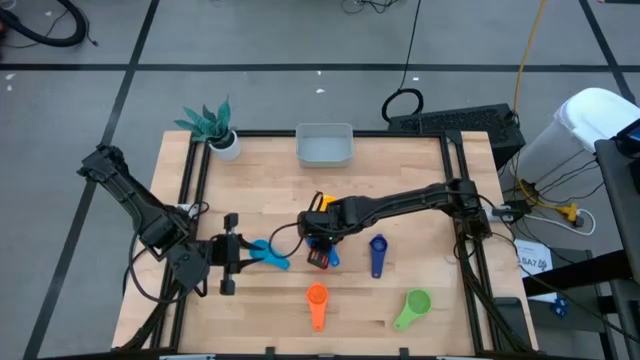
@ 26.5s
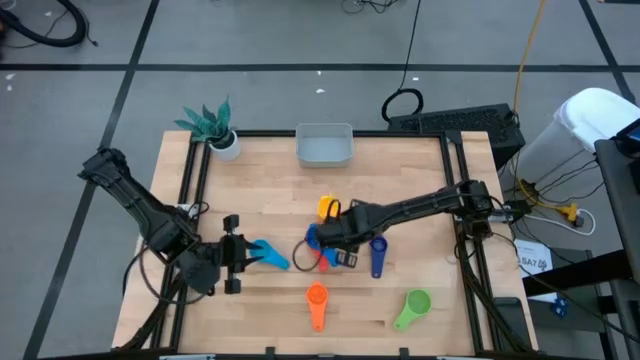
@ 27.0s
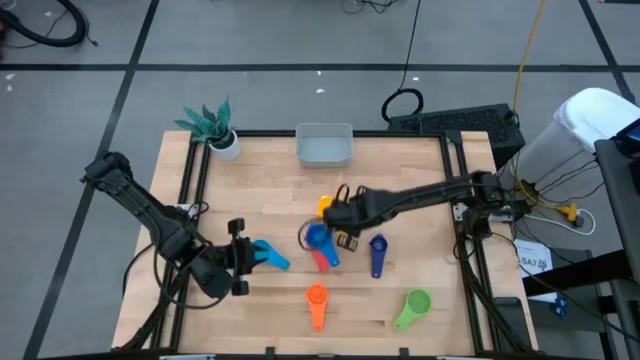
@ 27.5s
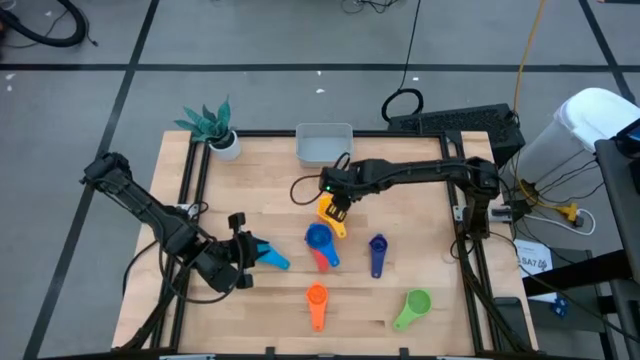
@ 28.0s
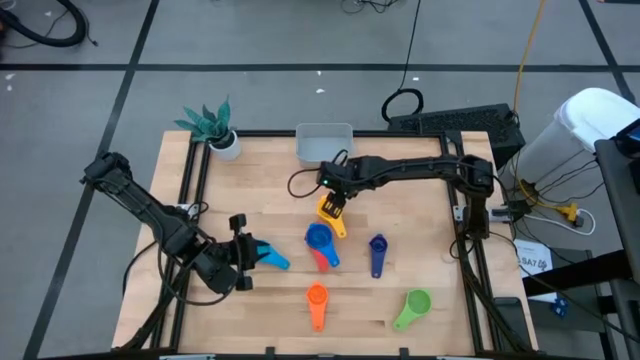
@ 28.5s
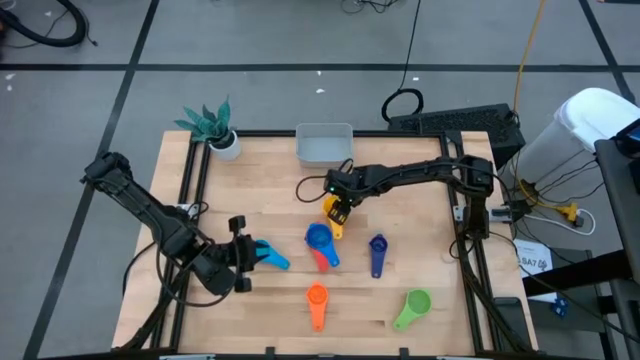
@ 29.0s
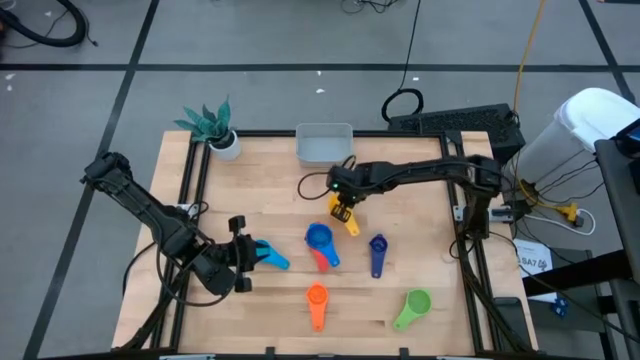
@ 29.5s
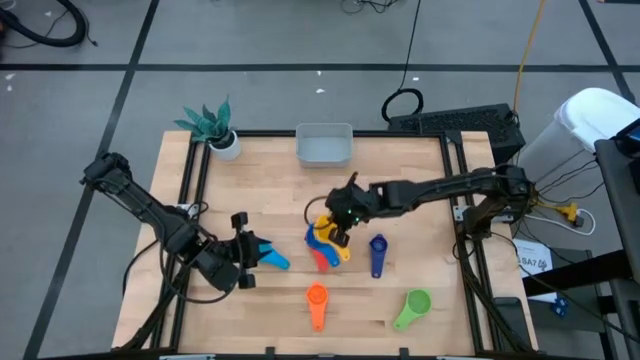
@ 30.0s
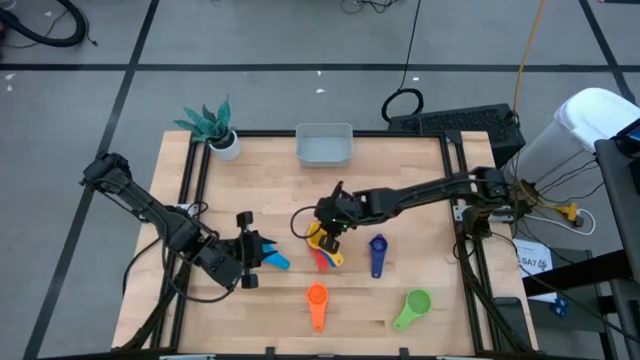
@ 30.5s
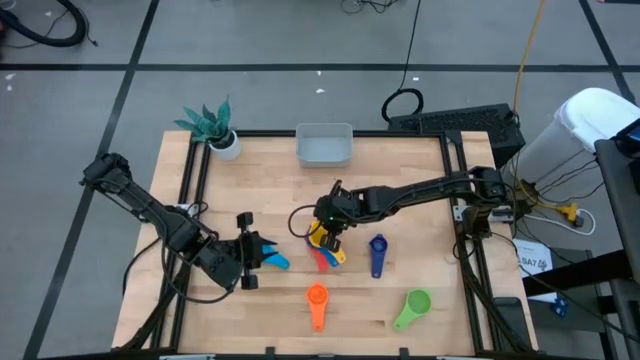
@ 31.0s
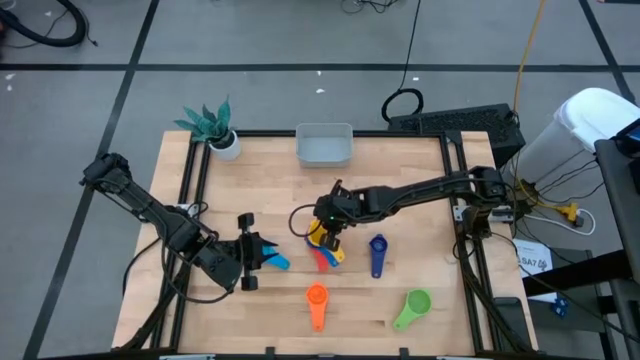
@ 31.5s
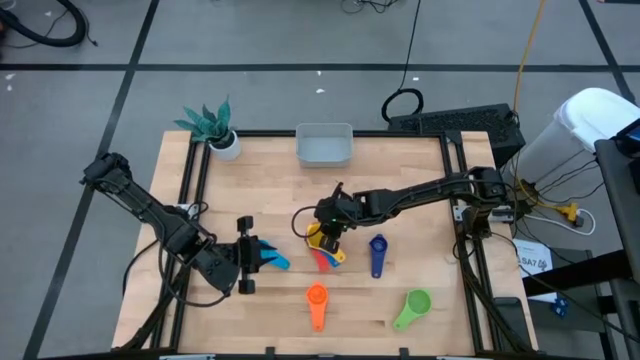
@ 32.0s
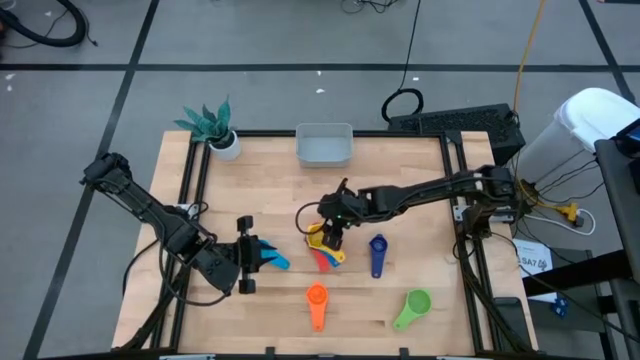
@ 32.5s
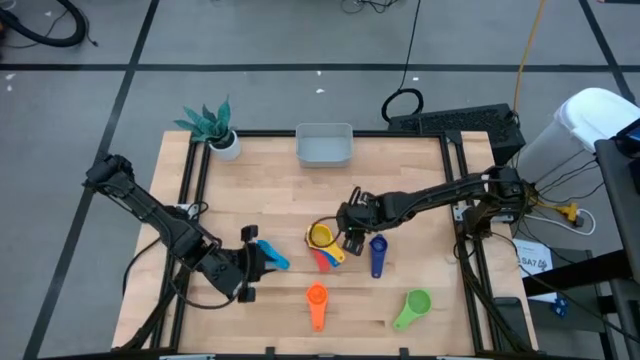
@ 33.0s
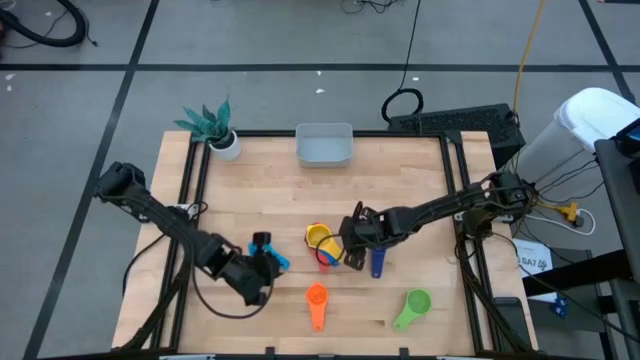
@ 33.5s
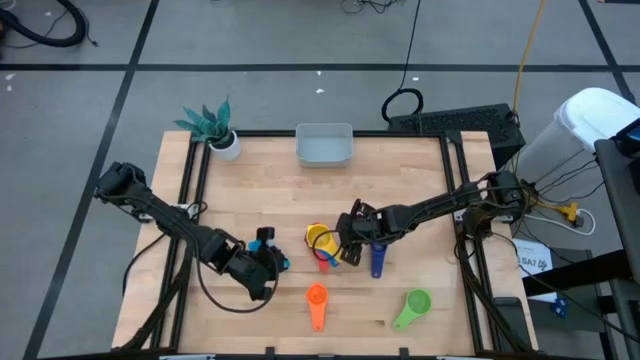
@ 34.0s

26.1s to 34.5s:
Task: Nest measuring cups in basket
Stack the yellow measuring cup on top of the blue measuring cup

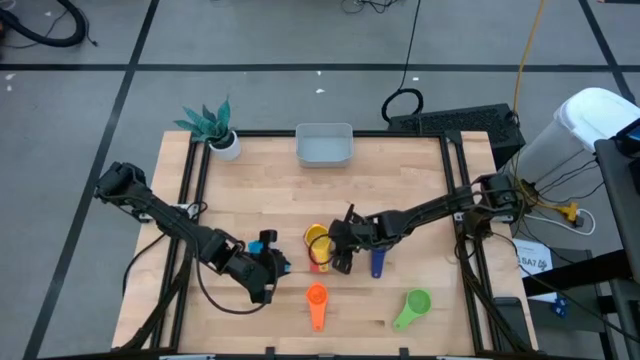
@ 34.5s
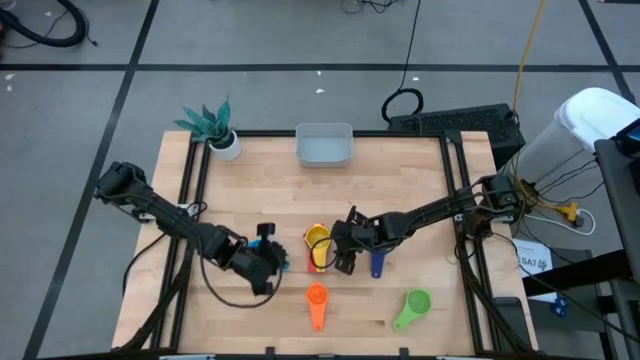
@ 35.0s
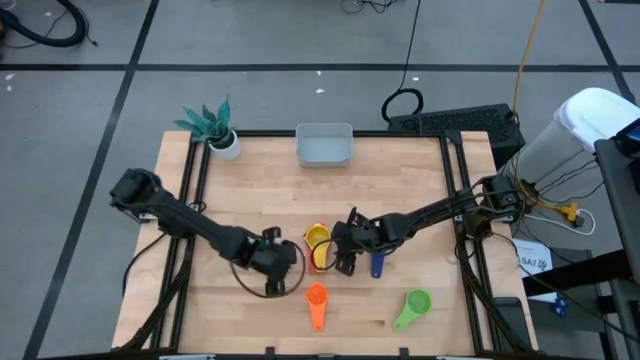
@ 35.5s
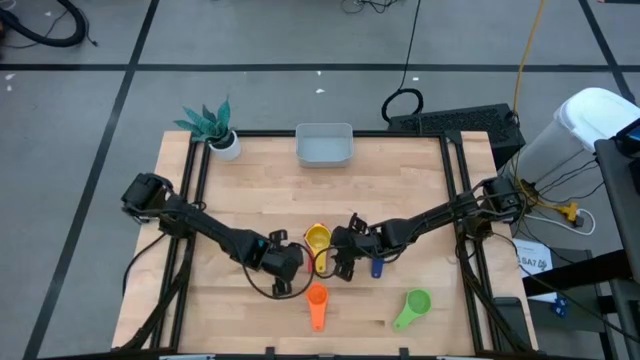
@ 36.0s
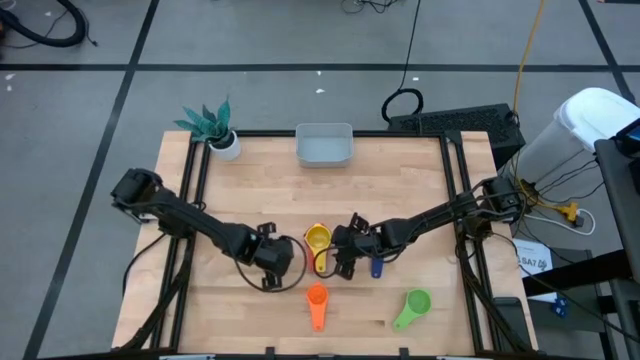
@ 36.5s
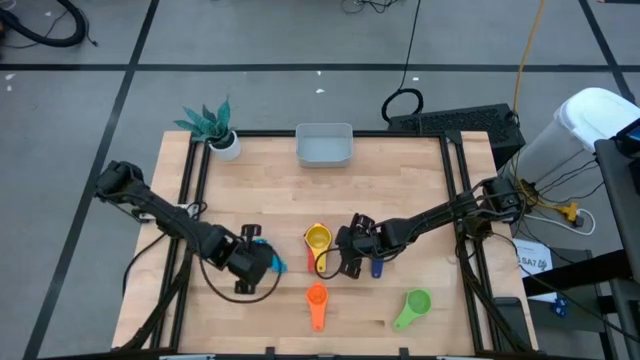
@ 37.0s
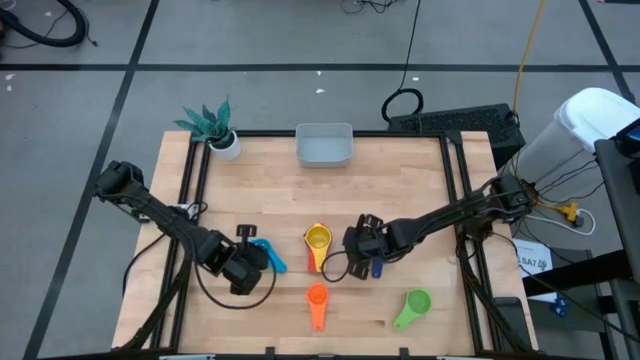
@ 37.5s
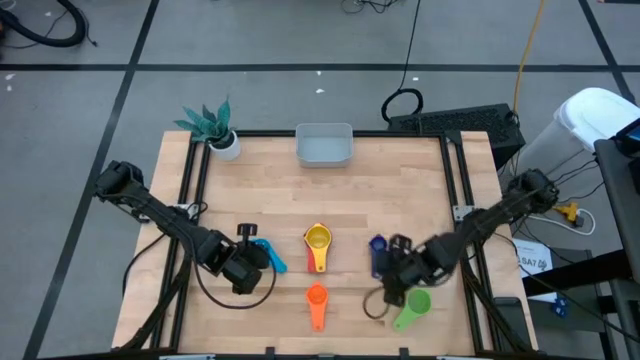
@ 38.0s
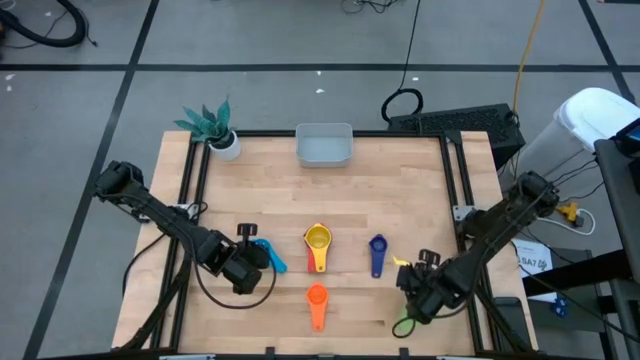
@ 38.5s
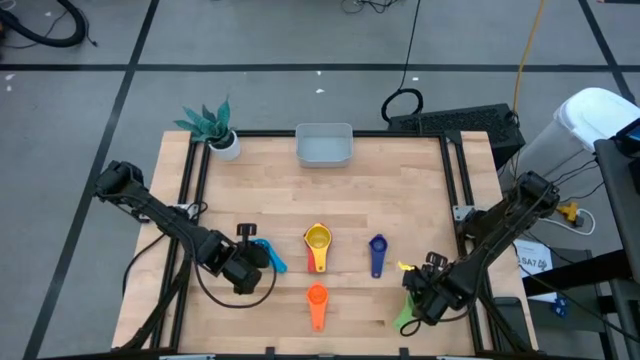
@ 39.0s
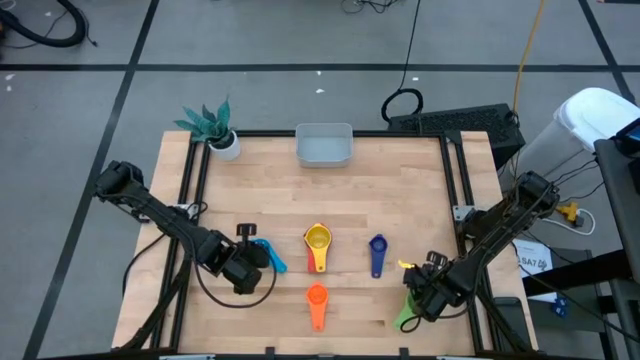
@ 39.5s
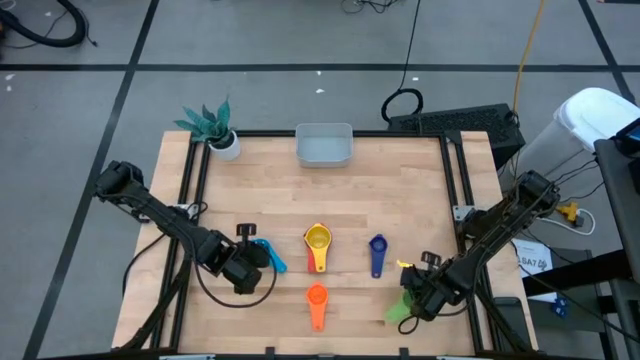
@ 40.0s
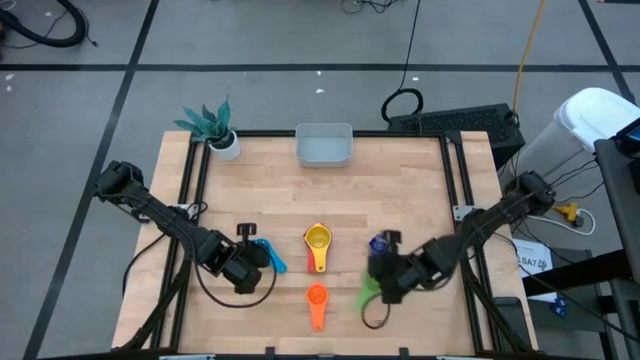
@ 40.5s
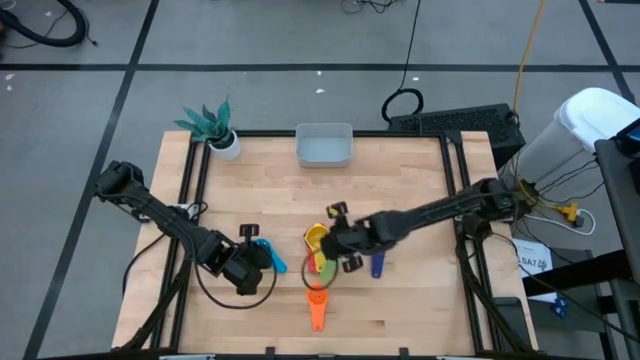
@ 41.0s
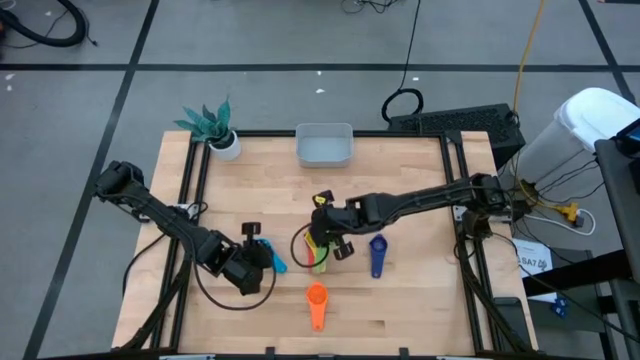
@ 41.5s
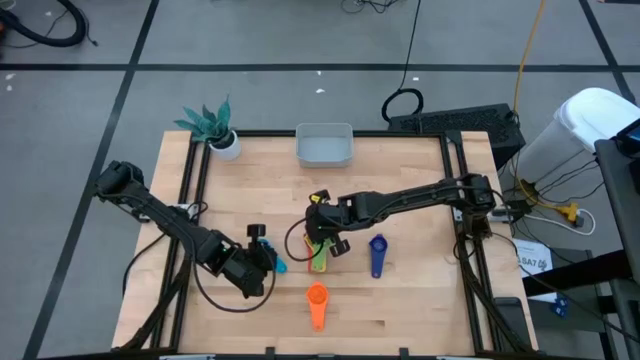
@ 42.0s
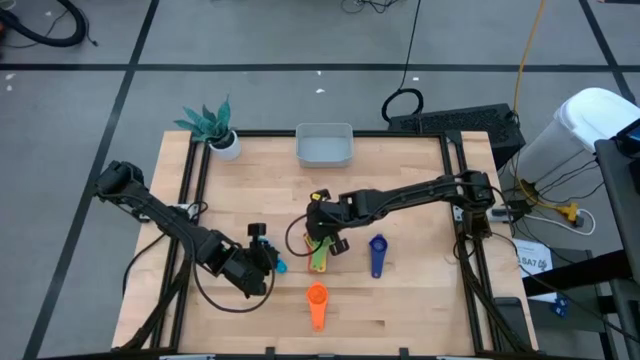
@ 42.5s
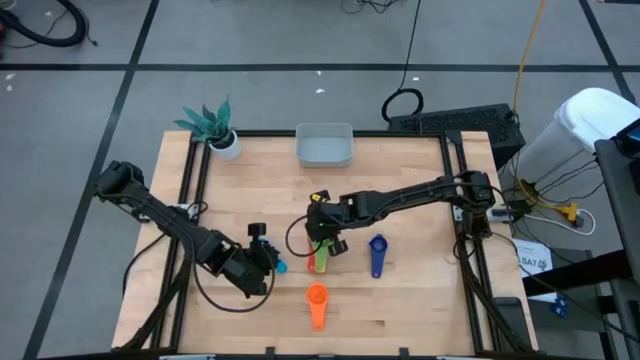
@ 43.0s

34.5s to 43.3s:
Stack the green measuring cup on top of the yellow measuring cup

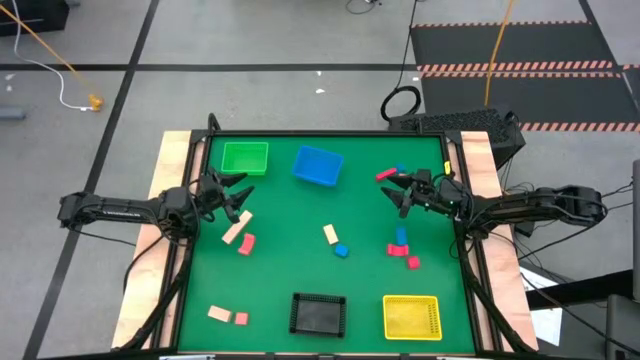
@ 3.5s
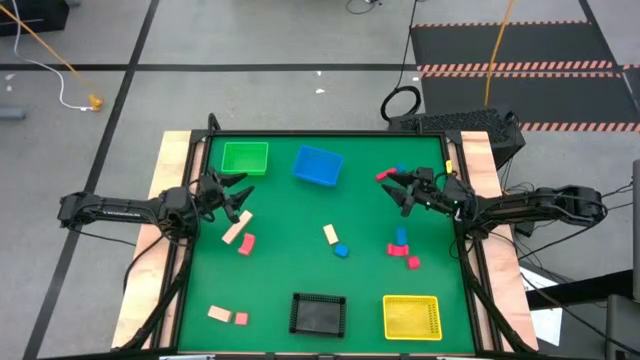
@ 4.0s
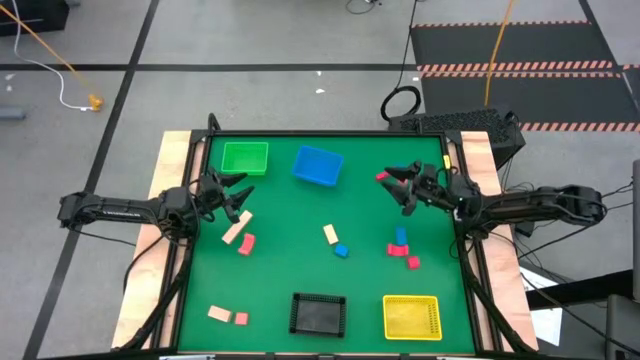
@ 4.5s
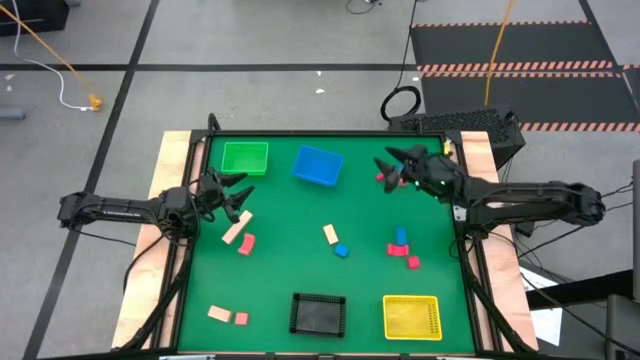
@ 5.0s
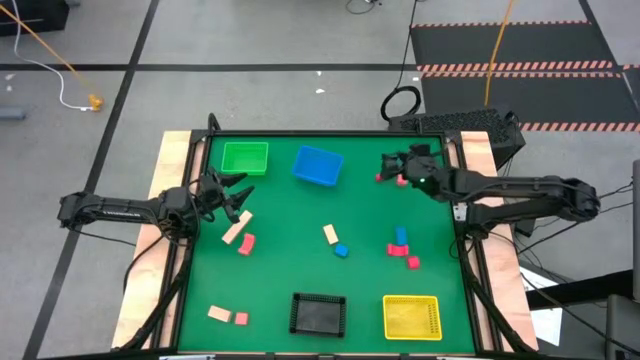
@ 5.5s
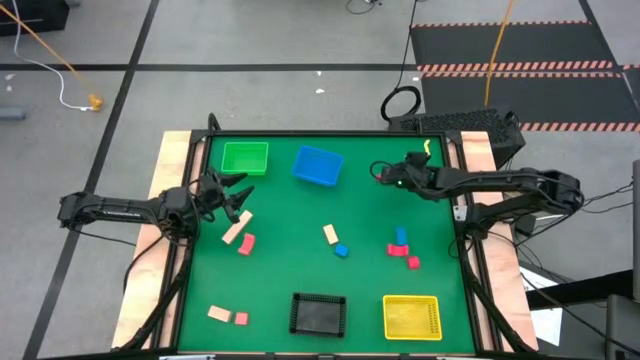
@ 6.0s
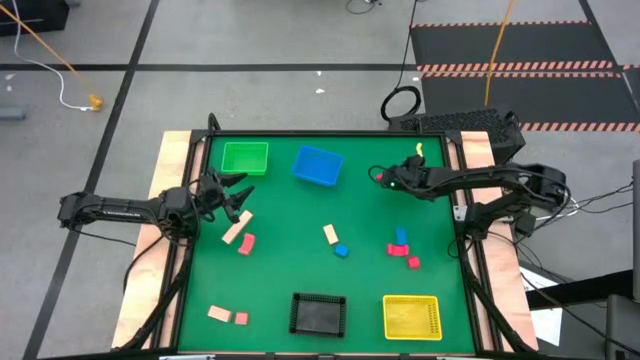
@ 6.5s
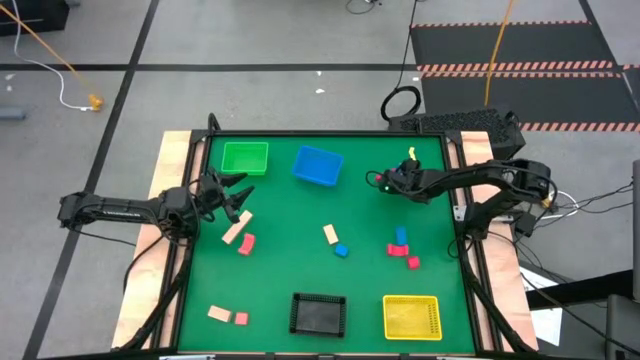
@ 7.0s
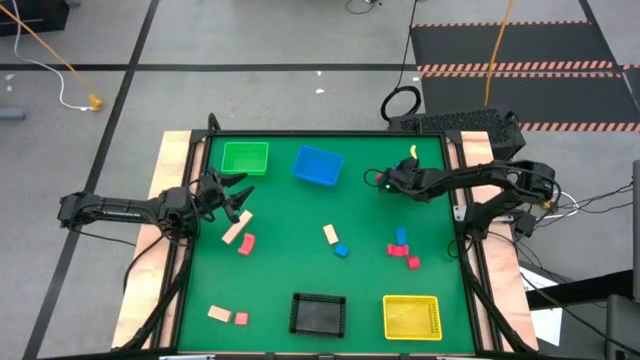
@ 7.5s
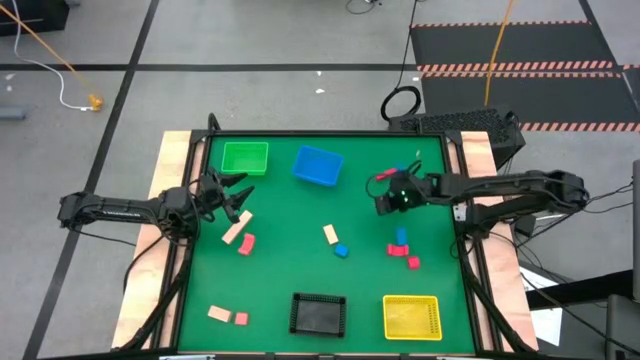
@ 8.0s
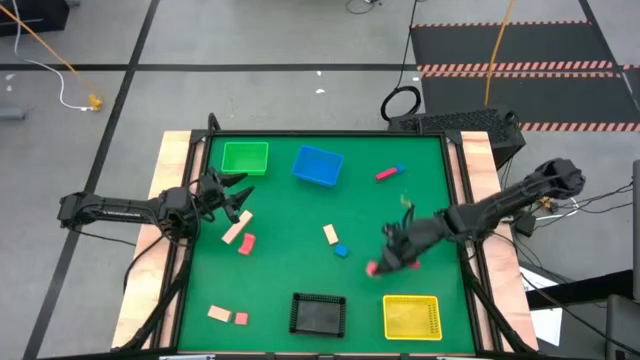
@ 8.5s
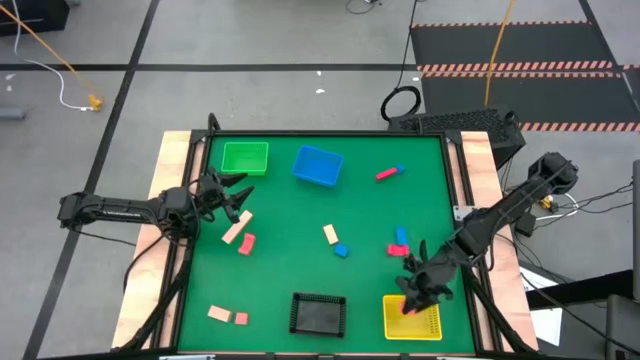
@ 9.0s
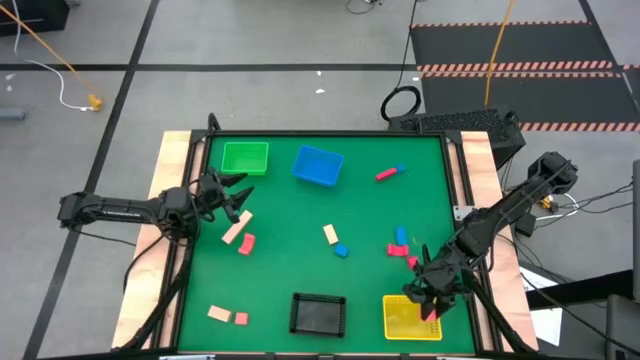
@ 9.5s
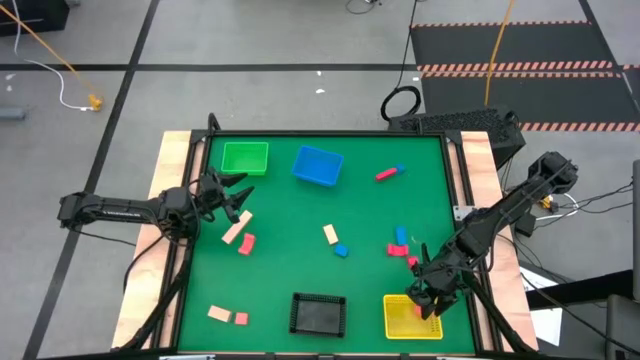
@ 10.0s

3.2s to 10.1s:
Task: Sort & place blocks by color
Put the right pink wooden block into the yellow basket
